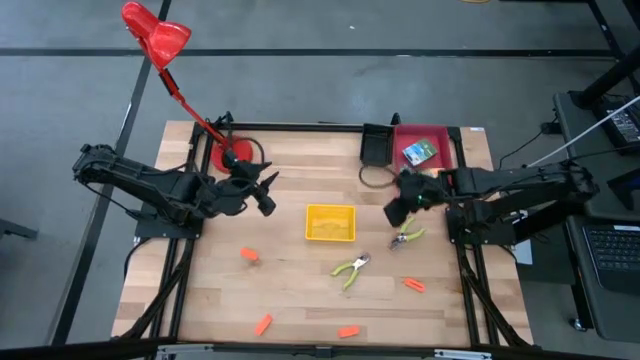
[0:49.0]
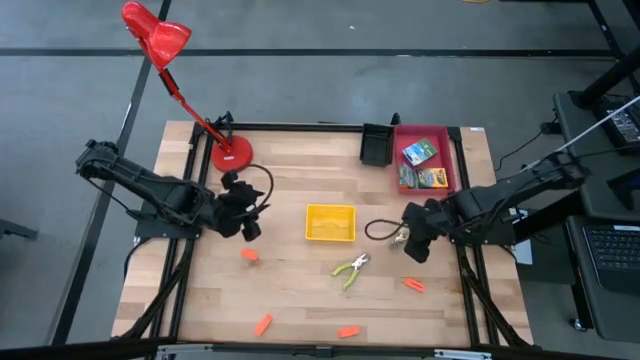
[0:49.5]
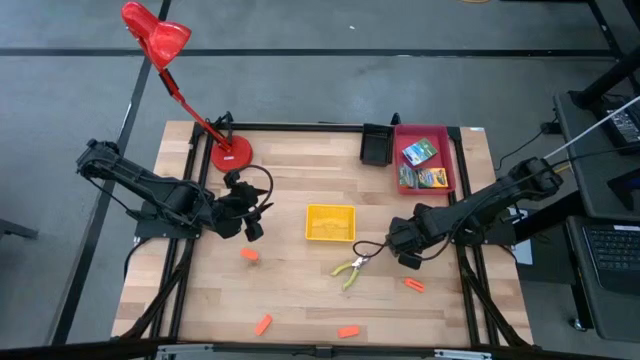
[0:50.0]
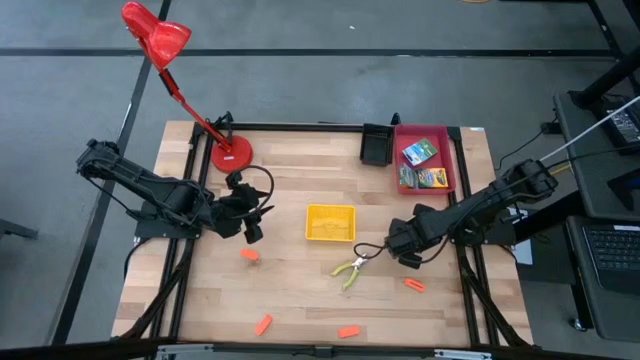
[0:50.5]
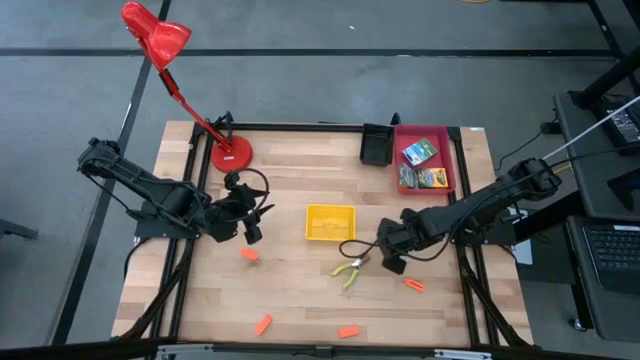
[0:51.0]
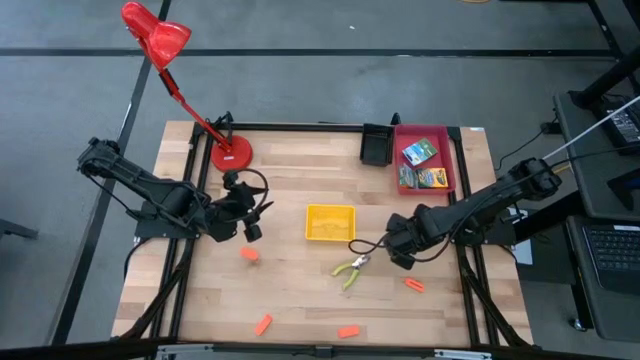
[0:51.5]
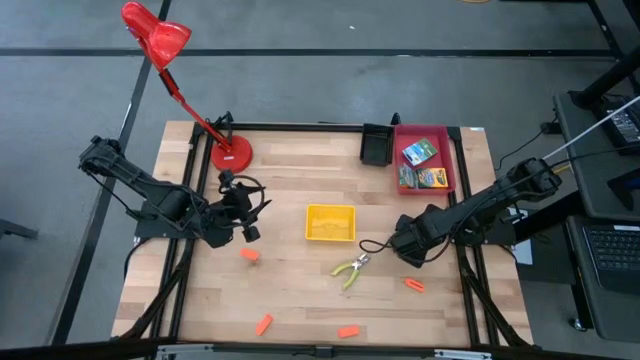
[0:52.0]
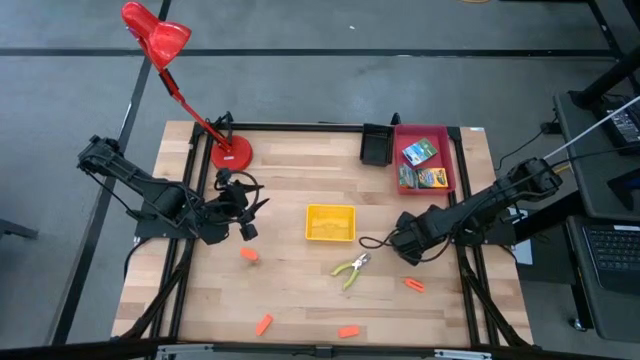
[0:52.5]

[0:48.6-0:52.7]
Task: Pick & Place School Supplies
Put the right green pliers into the black bin

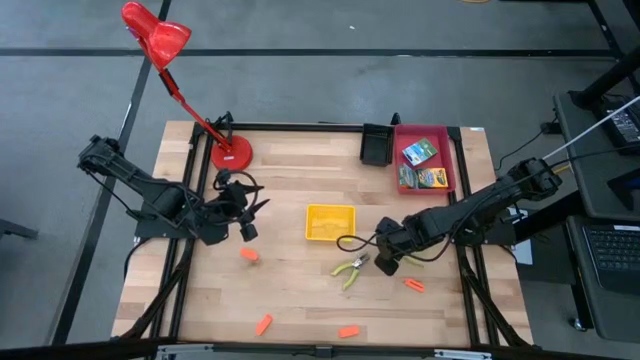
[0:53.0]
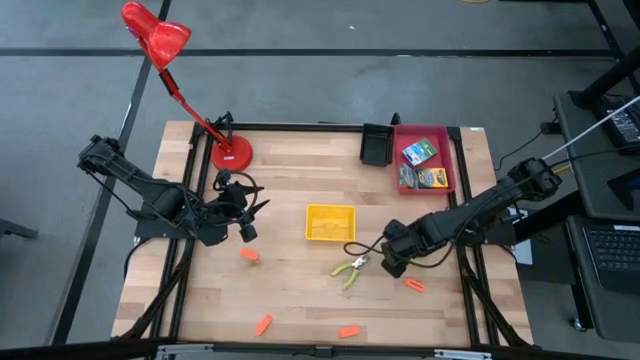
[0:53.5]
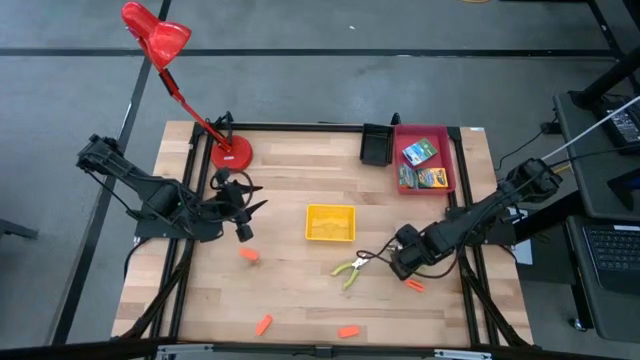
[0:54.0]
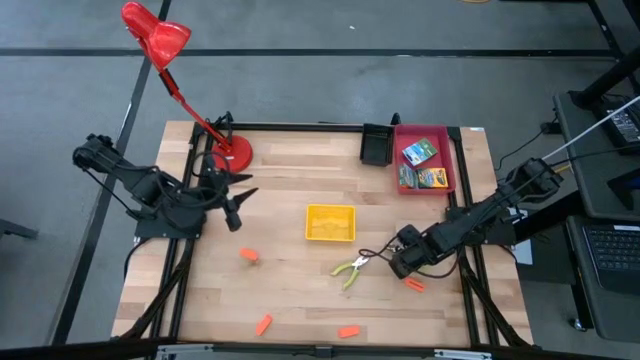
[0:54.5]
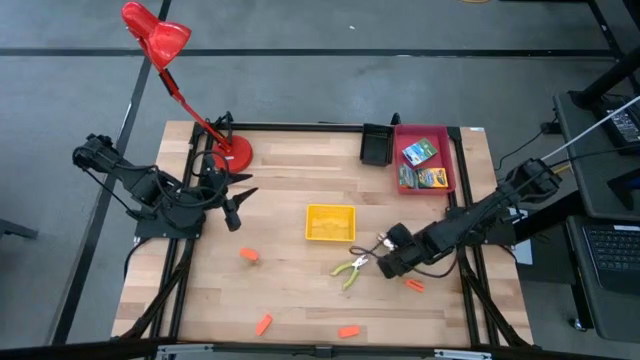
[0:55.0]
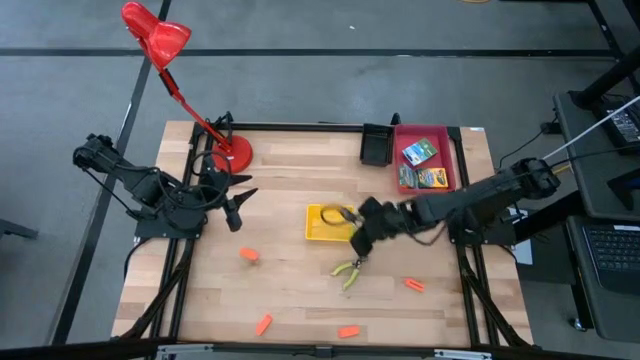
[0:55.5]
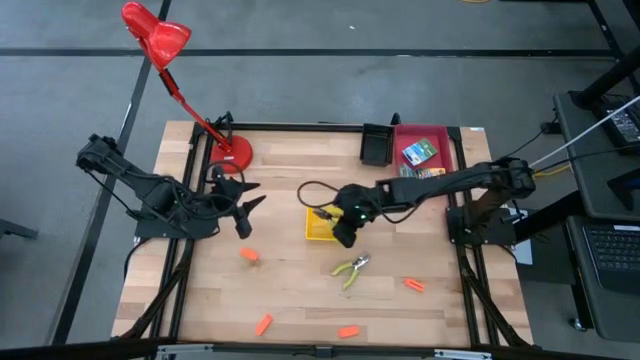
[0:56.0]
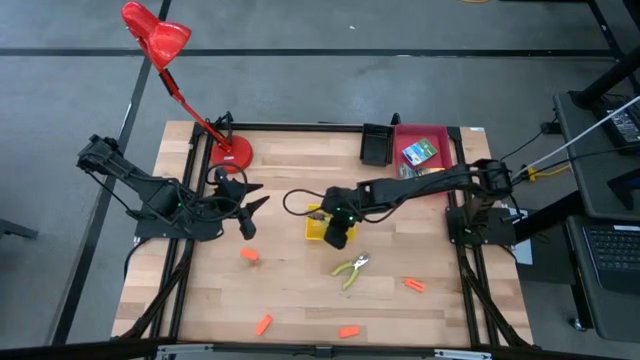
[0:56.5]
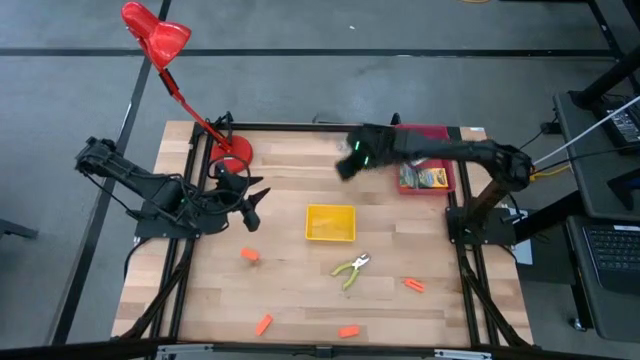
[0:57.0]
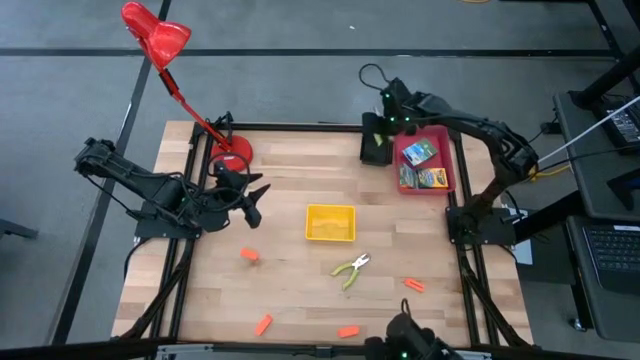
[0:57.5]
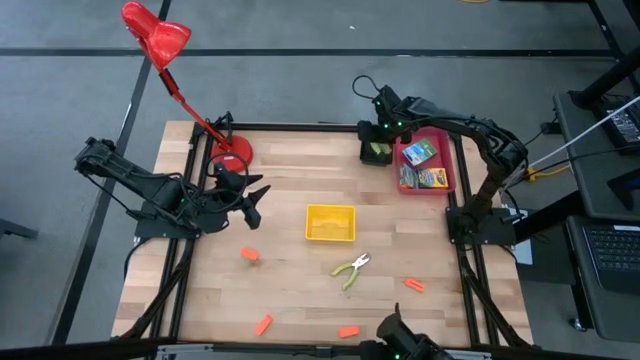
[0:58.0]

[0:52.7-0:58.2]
Put the right green pliers into the black bin

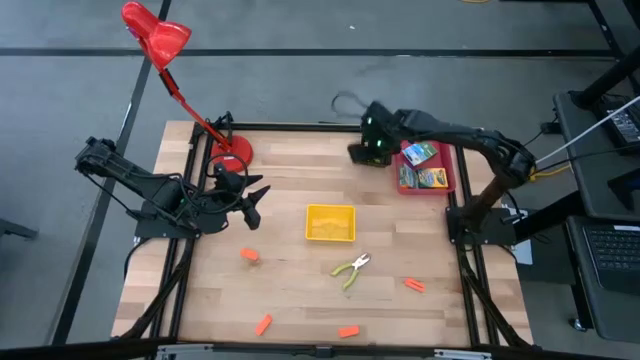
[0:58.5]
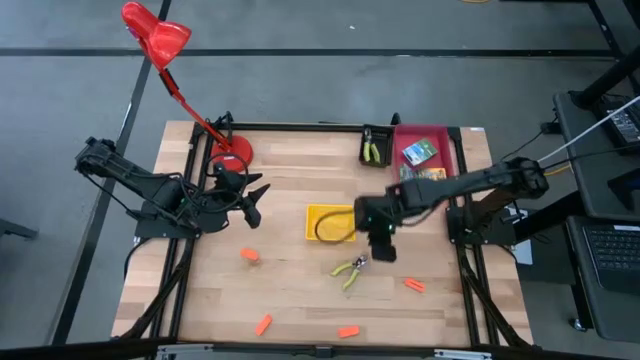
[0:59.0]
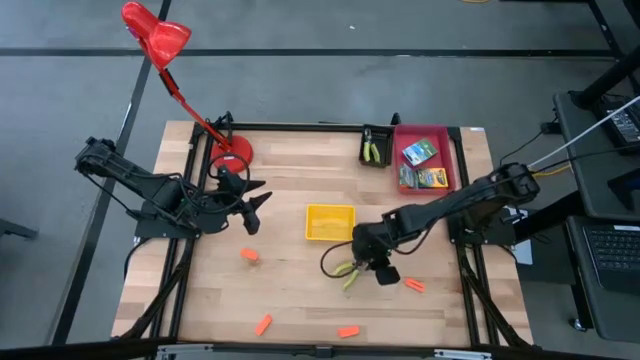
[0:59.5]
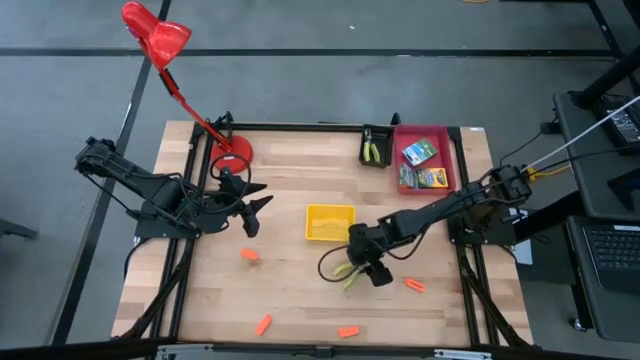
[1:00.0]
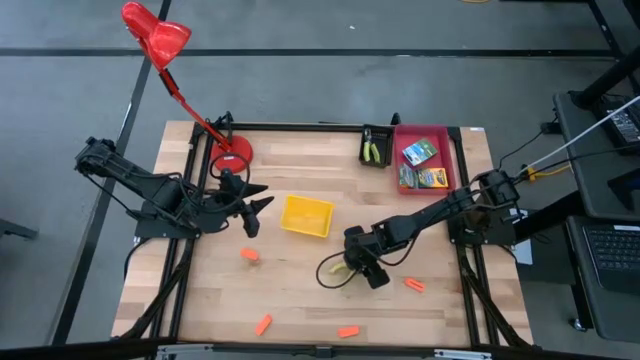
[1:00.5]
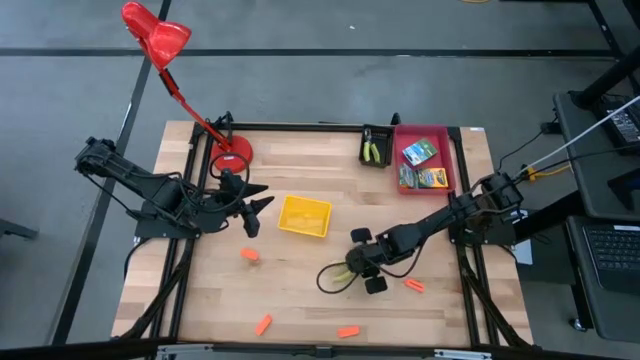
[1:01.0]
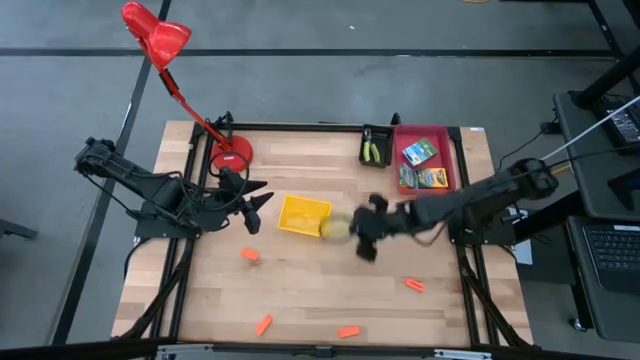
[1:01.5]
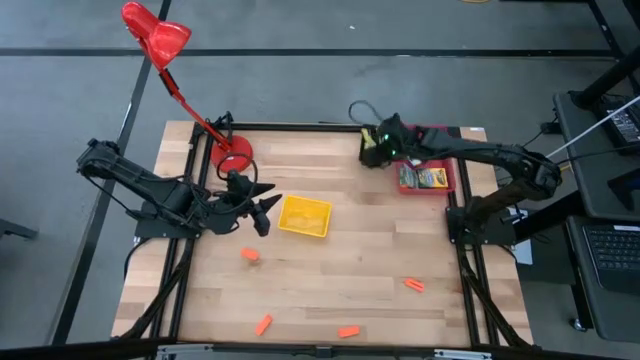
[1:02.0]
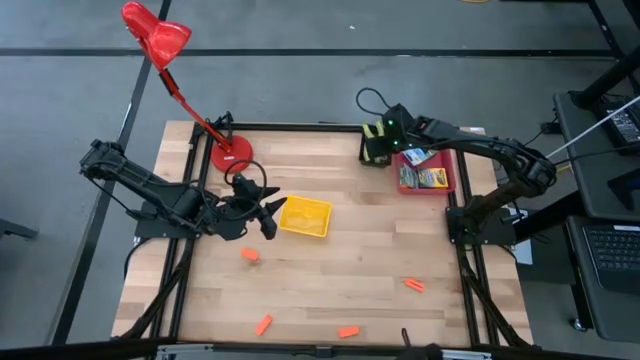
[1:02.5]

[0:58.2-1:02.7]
Put the green pliers into the black bin

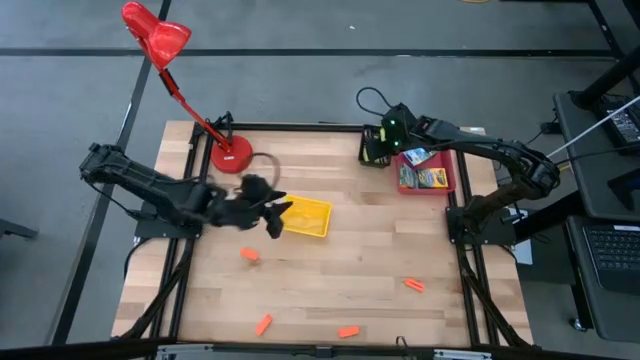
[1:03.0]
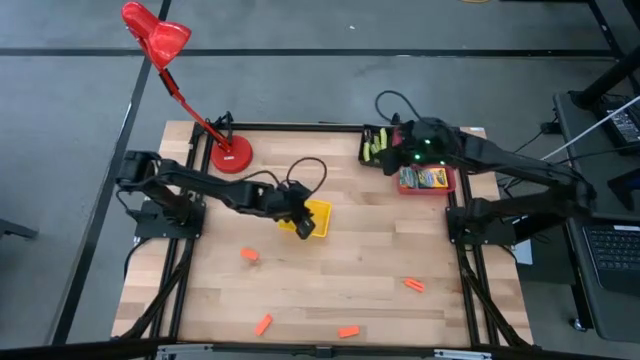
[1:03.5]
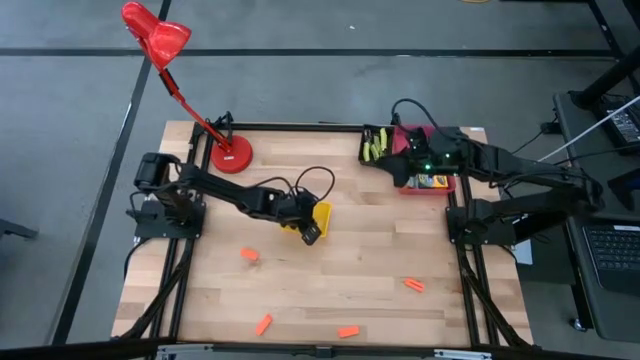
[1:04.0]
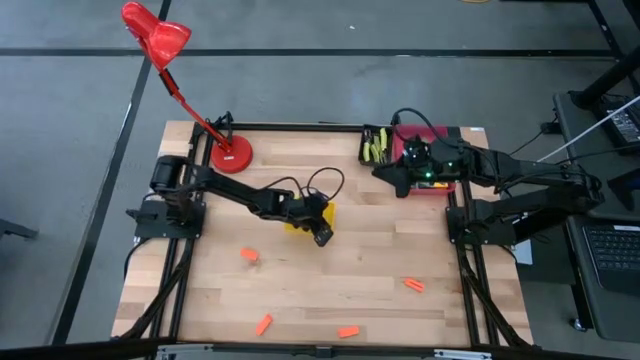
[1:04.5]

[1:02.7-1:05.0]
Adjust the yellow bin

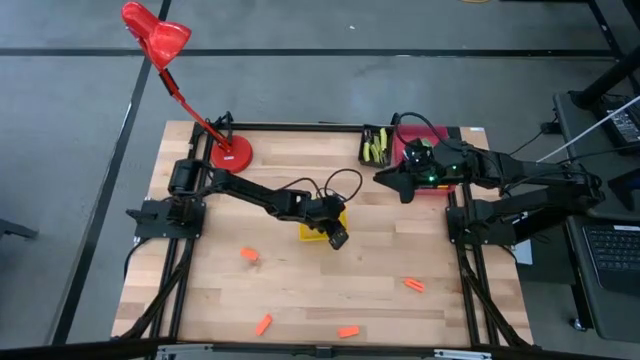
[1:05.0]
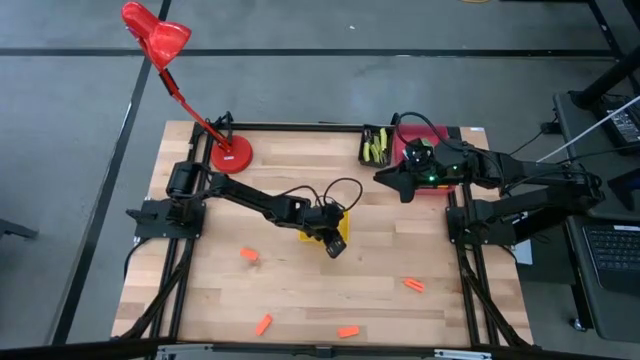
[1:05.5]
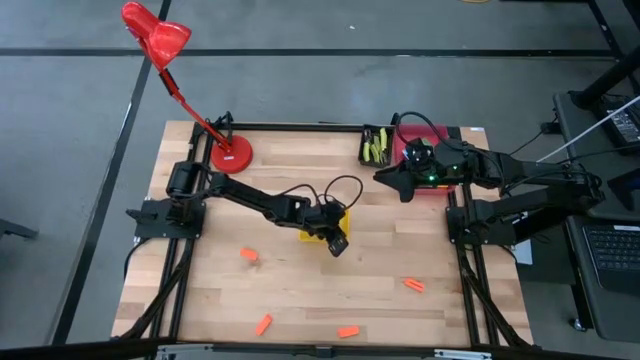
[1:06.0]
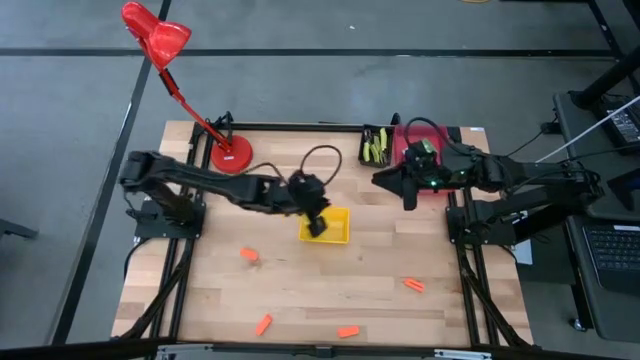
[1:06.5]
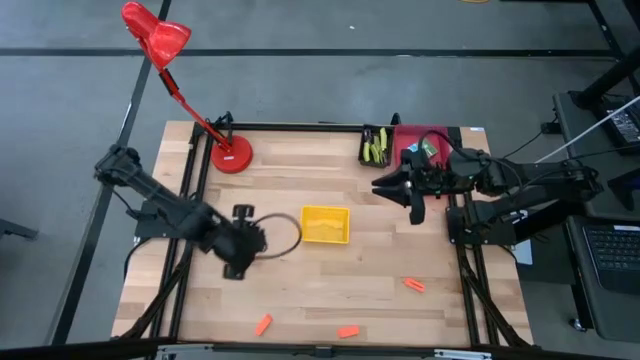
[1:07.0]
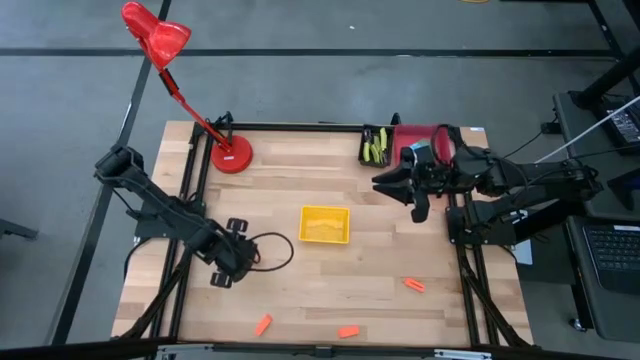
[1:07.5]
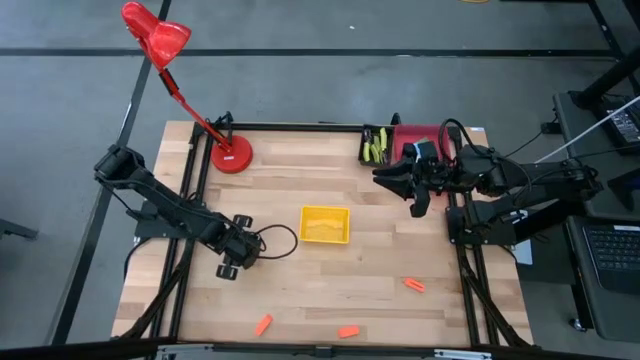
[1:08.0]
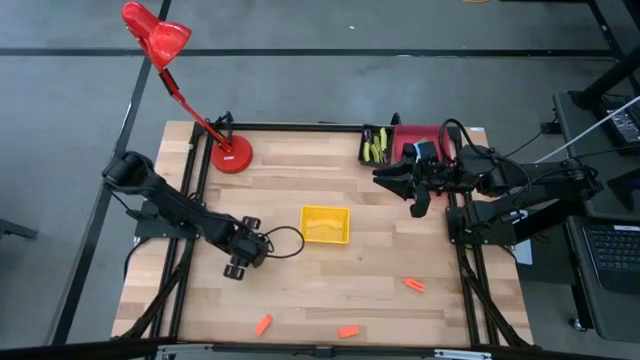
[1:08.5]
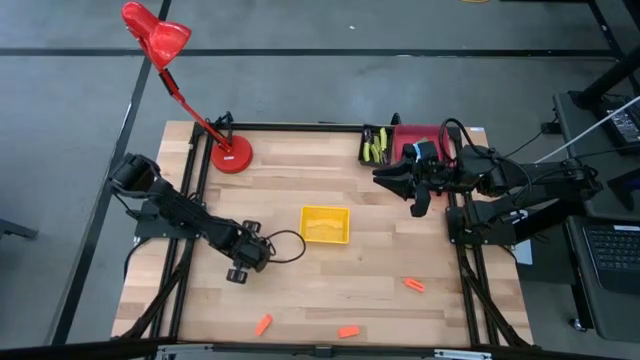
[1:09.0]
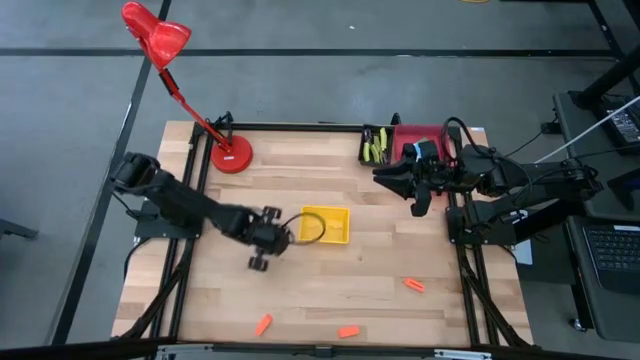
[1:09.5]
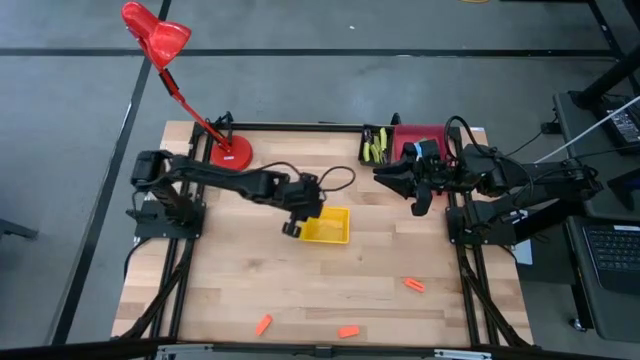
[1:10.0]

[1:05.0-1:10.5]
Put the orange eraser into the yellow bin
